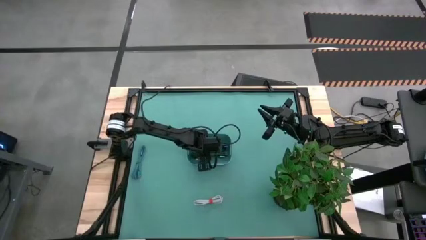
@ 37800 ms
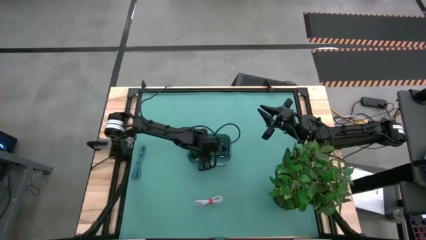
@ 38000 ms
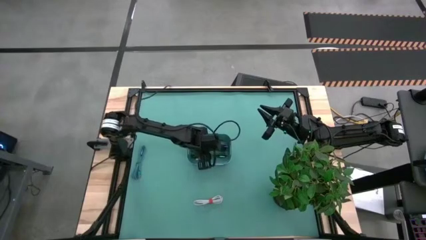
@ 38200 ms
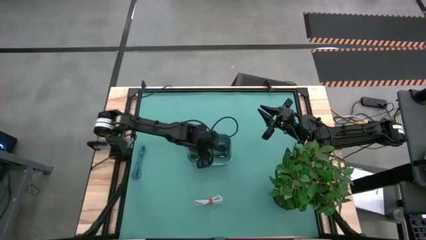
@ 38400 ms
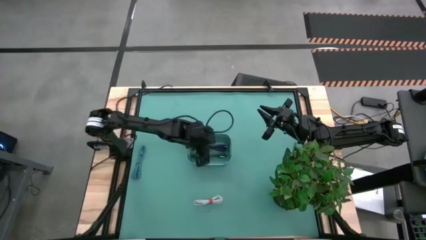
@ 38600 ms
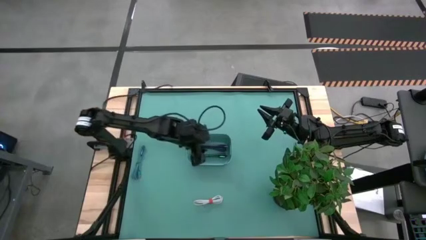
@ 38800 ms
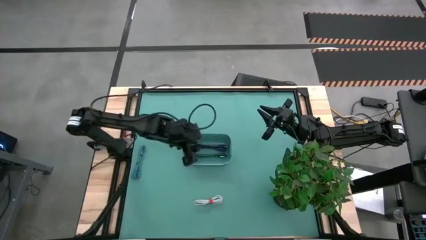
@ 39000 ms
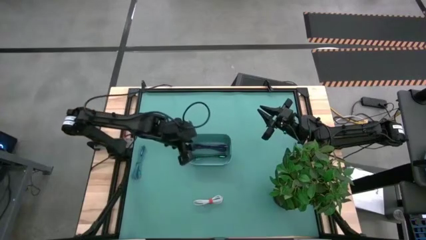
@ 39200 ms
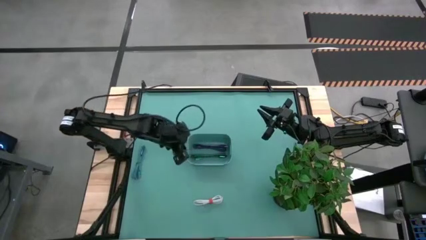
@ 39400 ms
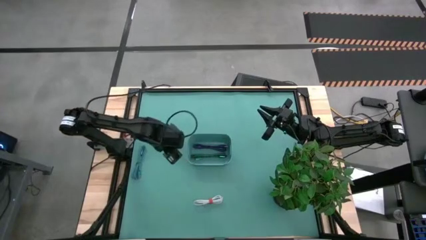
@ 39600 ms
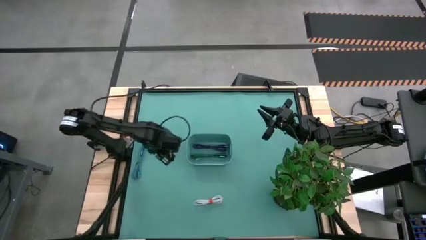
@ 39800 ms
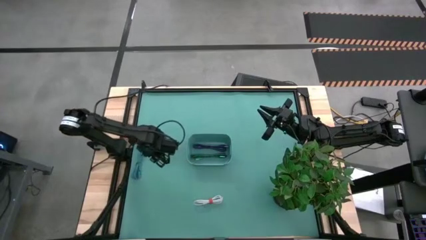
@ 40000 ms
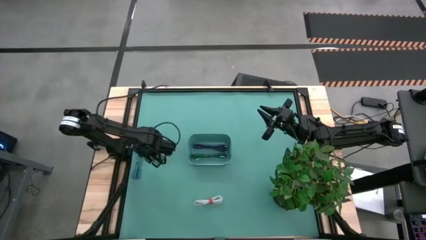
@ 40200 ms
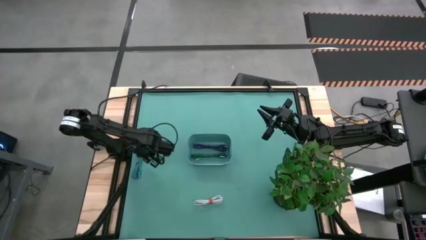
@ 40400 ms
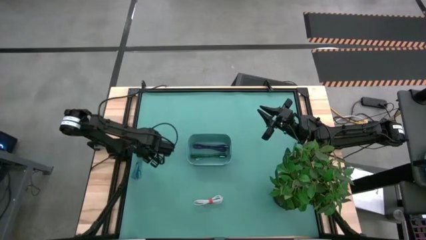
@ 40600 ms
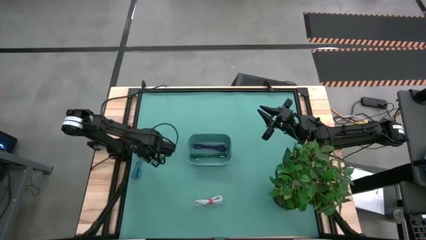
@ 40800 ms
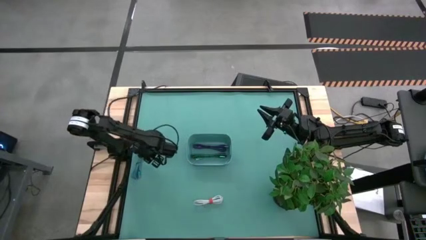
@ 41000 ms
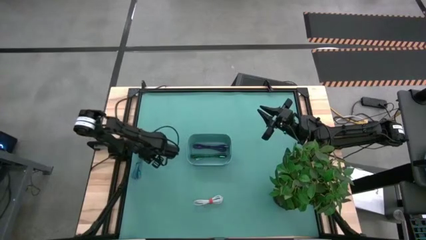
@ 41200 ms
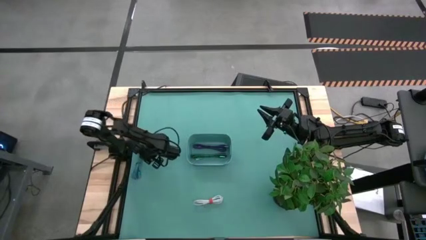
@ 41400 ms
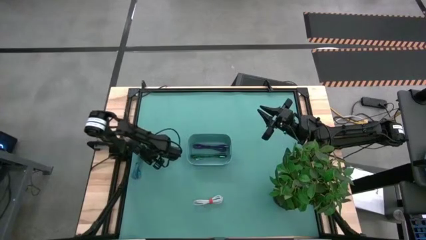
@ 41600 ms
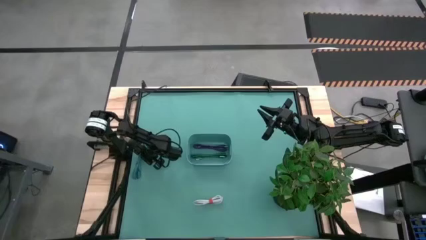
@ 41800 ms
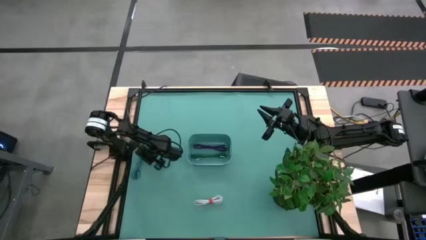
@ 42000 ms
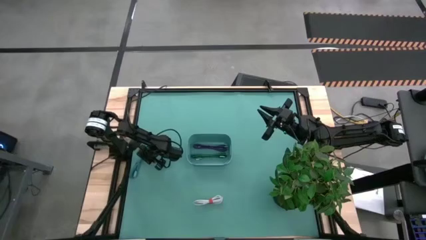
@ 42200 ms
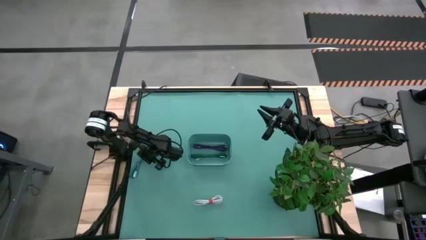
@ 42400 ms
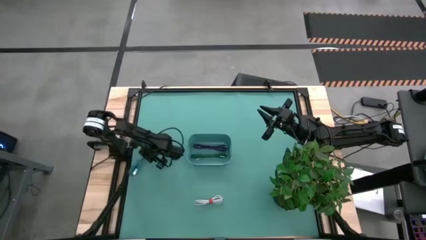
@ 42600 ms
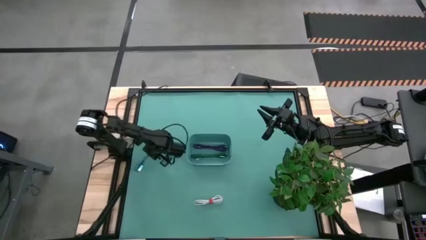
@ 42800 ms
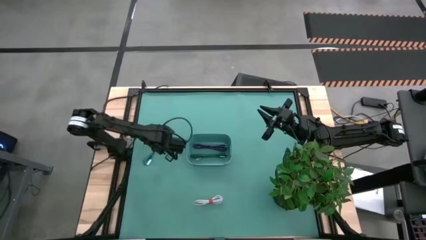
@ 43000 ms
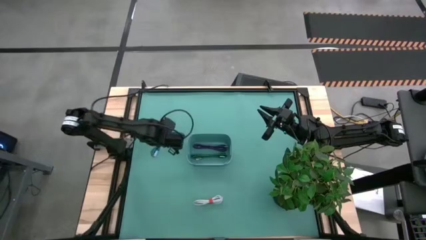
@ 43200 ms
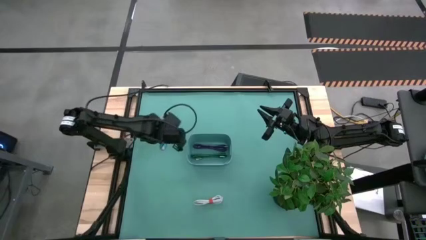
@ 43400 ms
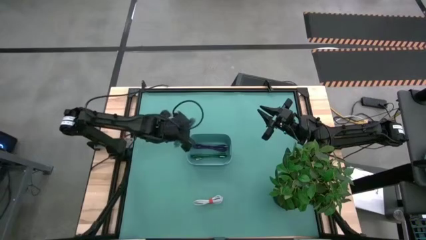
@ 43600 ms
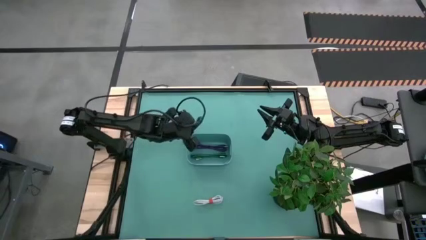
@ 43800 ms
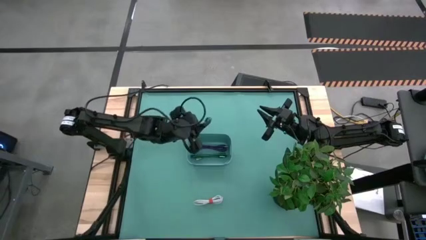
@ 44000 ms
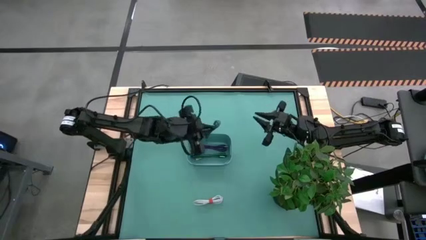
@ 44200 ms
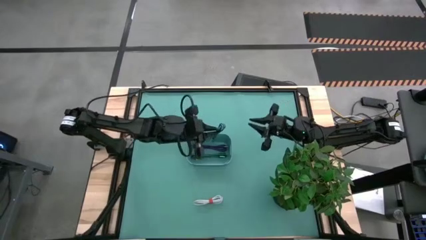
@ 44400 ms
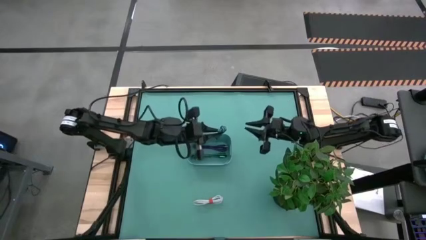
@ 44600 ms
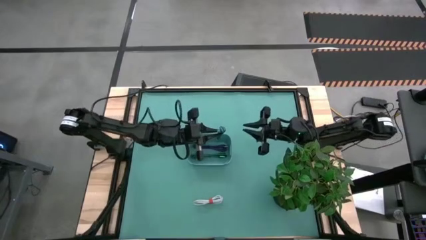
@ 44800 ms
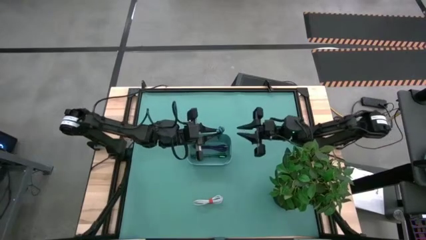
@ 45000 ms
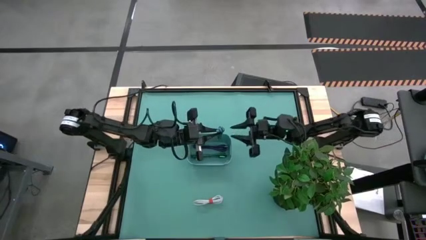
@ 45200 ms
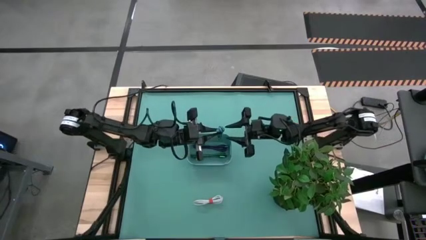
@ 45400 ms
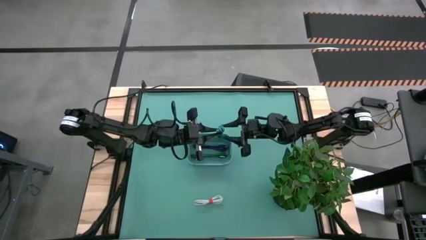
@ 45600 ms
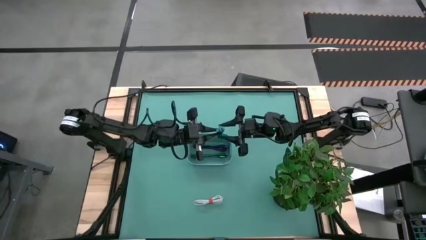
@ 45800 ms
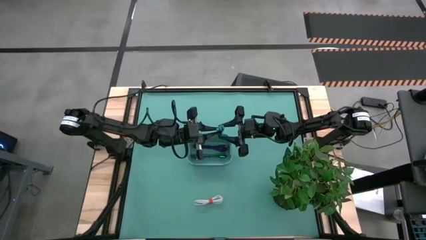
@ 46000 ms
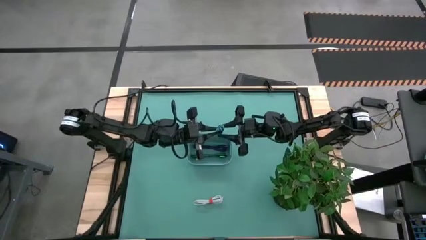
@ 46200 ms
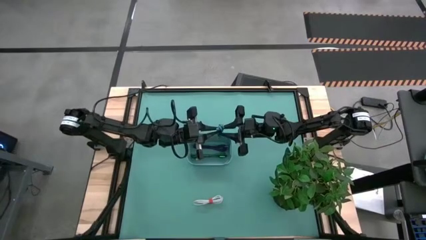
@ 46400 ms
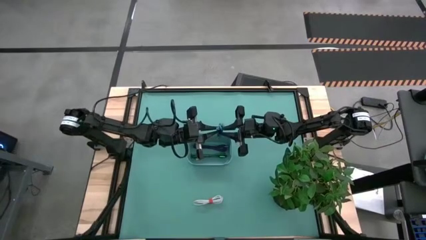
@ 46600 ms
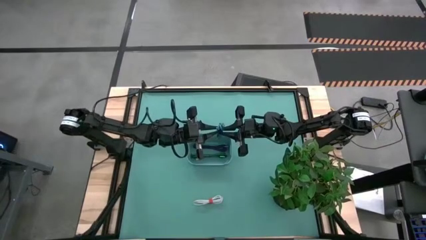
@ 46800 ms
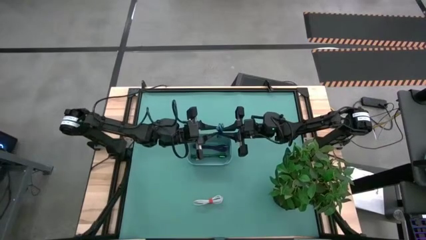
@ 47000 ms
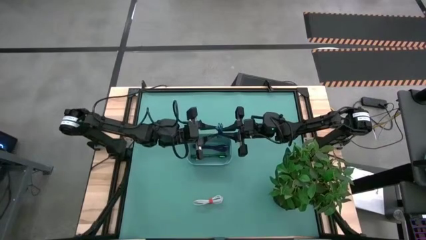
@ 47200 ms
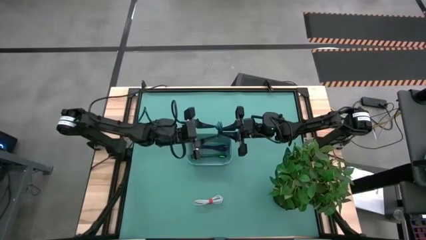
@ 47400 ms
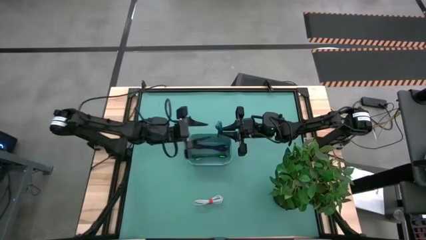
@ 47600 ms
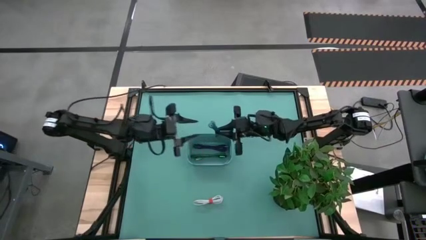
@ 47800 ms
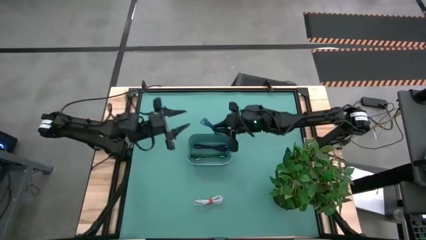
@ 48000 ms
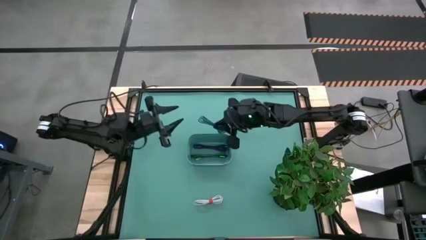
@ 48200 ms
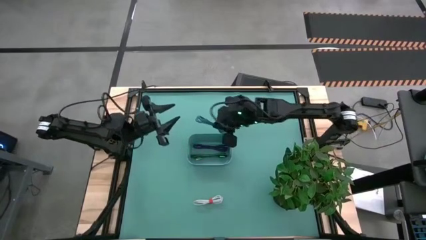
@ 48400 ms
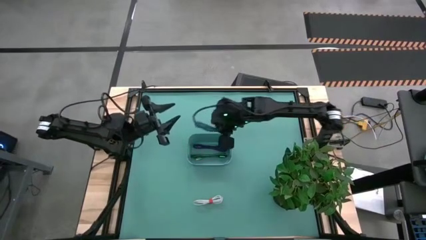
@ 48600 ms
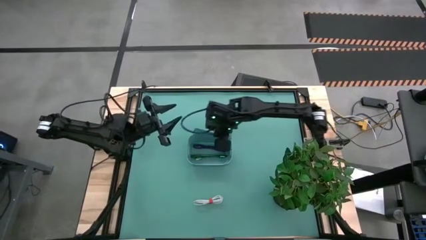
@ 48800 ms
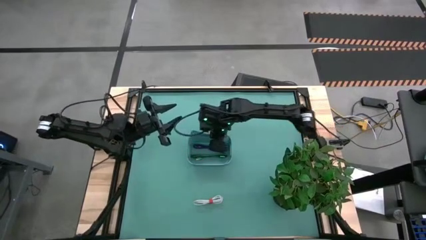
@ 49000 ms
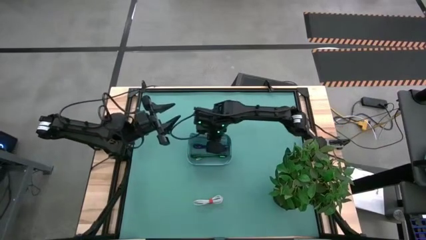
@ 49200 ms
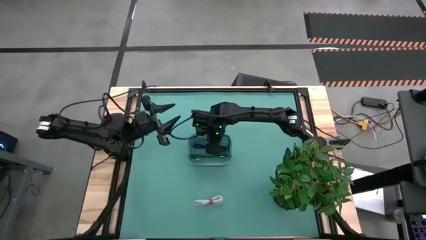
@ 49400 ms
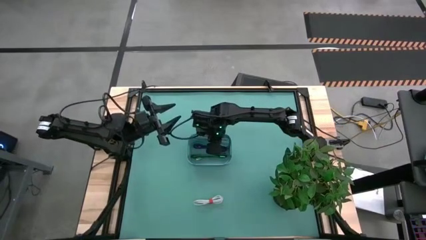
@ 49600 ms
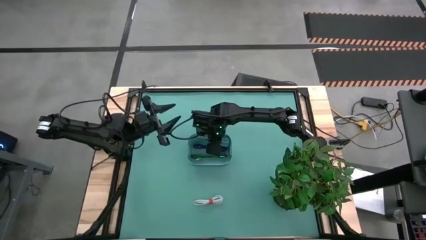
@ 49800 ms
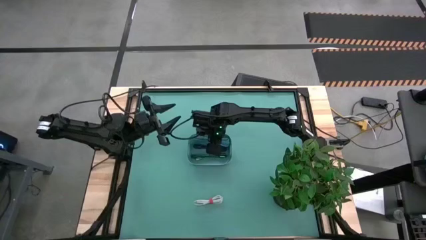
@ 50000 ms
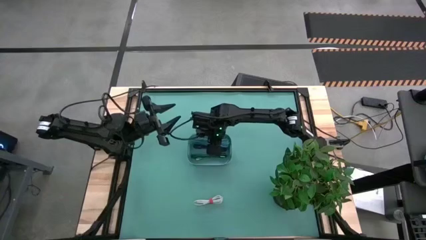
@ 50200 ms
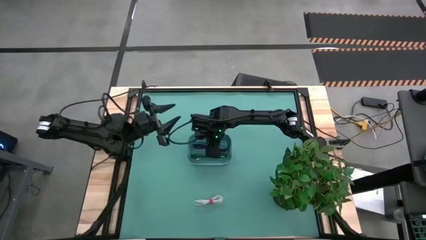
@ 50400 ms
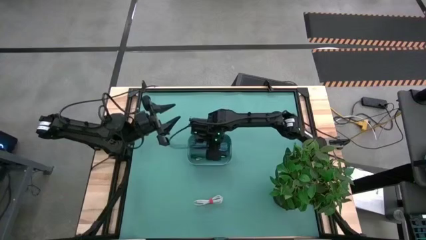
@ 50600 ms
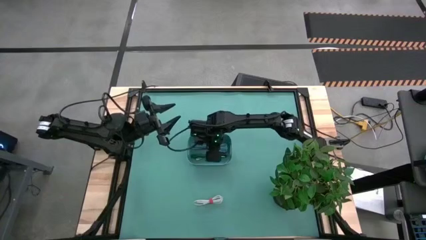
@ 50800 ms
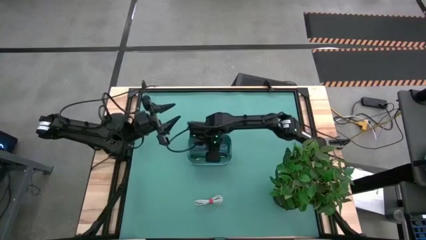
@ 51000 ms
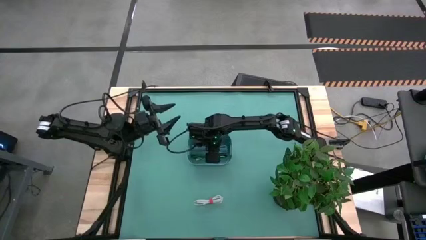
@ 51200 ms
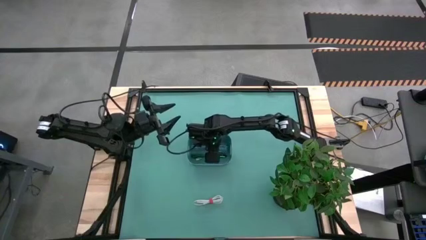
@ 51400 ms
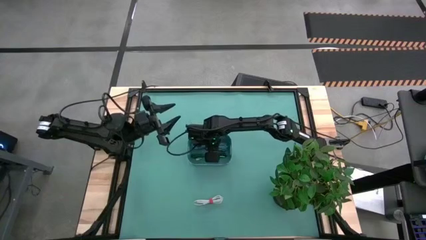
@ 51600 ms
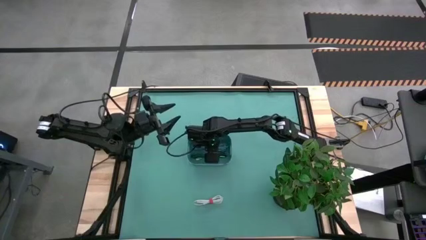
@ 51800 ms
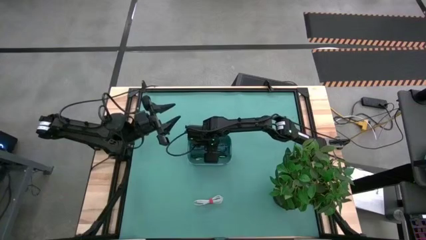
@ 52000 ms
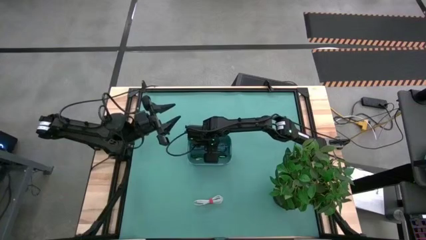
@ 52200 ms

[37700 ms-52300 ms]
Task: Pick and place USB-C Cables
Put the blue charger cable into the green bin
